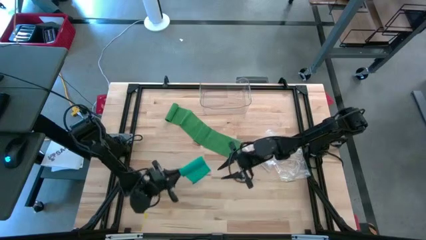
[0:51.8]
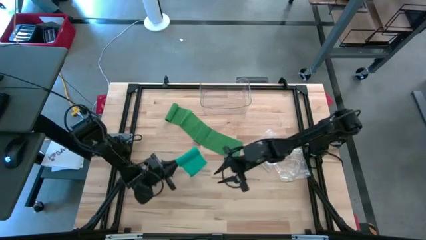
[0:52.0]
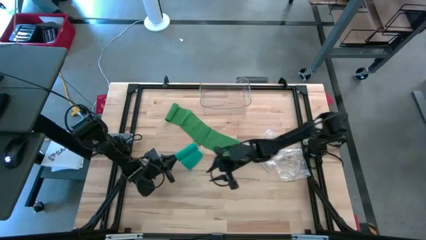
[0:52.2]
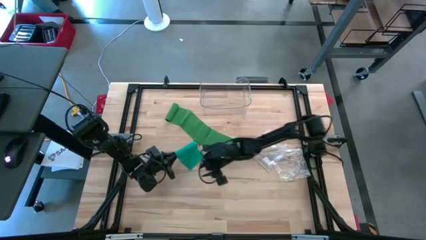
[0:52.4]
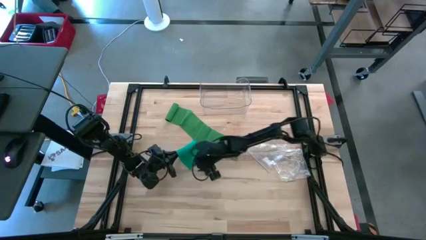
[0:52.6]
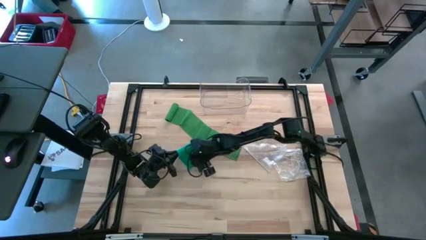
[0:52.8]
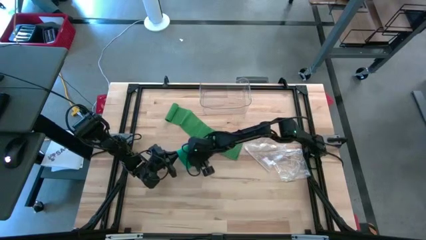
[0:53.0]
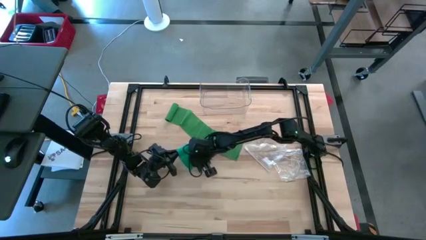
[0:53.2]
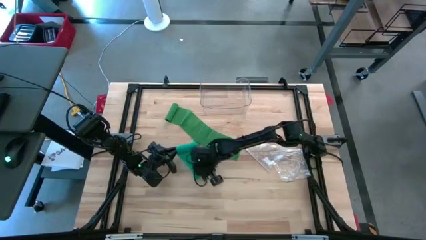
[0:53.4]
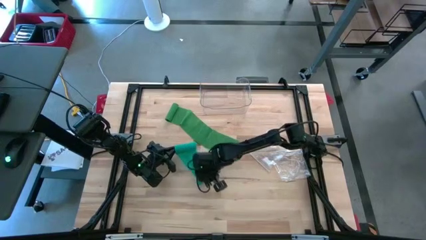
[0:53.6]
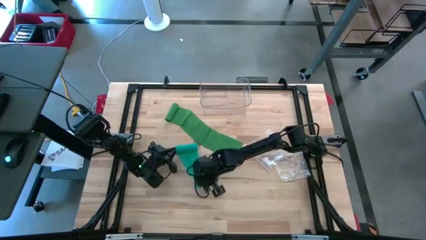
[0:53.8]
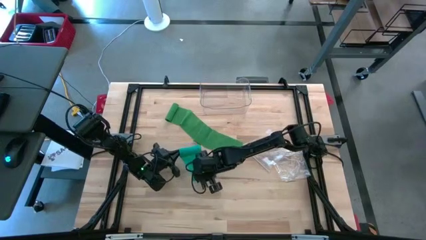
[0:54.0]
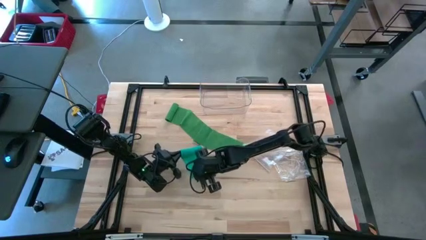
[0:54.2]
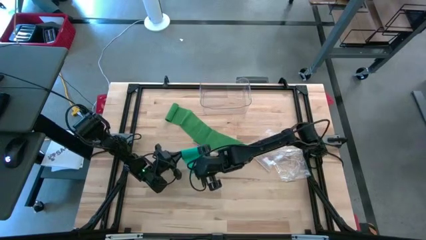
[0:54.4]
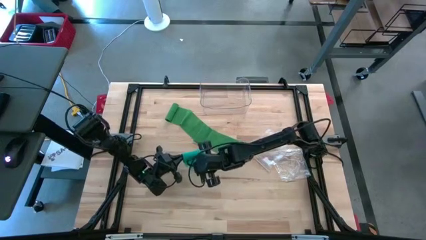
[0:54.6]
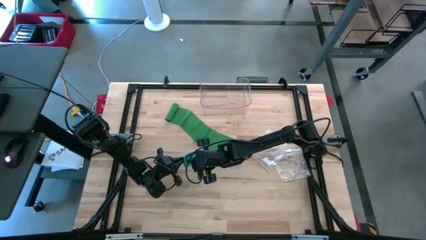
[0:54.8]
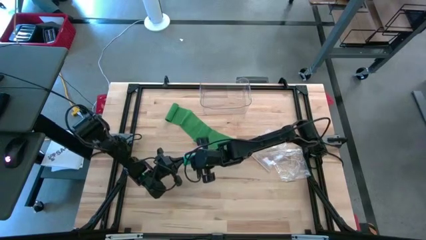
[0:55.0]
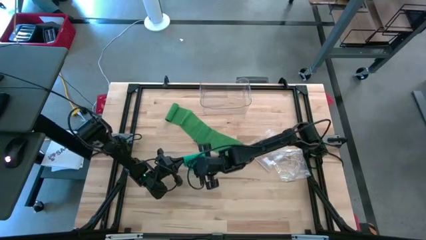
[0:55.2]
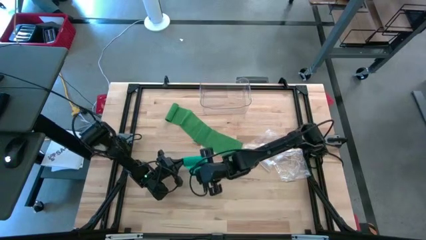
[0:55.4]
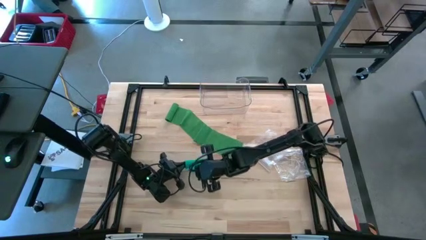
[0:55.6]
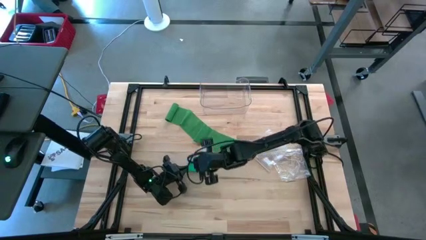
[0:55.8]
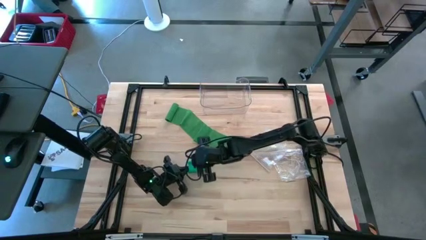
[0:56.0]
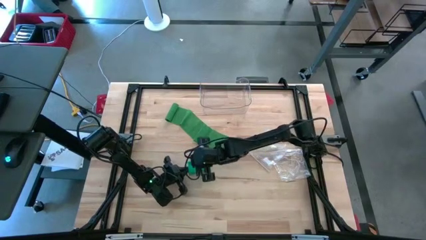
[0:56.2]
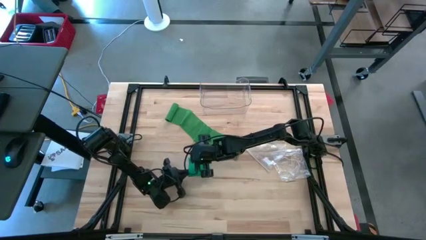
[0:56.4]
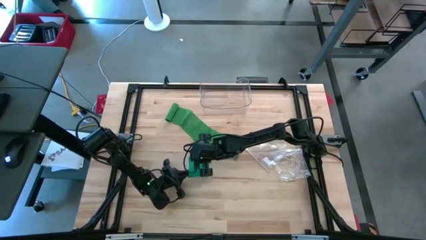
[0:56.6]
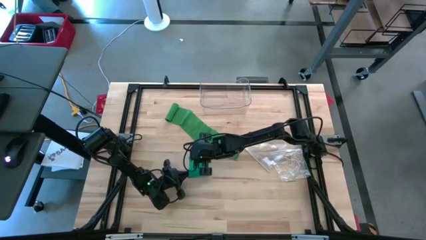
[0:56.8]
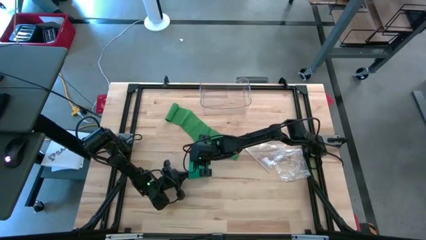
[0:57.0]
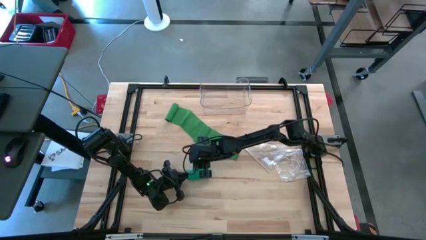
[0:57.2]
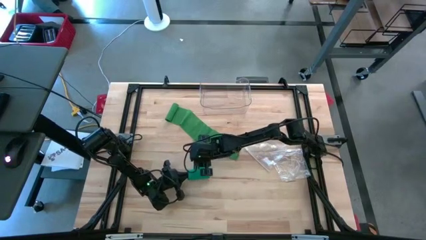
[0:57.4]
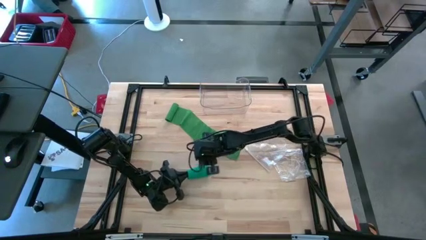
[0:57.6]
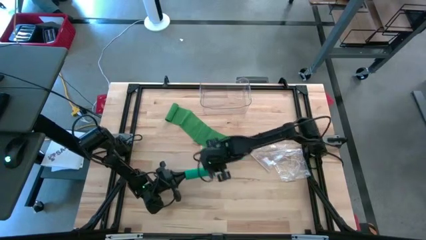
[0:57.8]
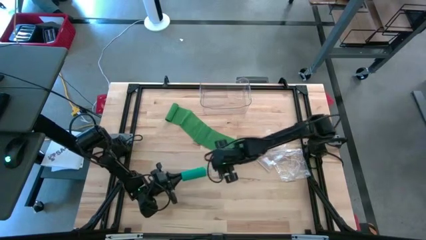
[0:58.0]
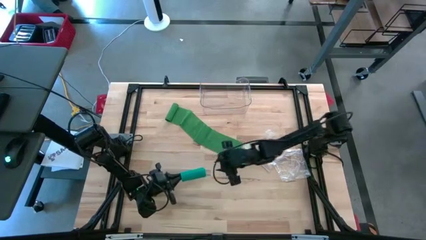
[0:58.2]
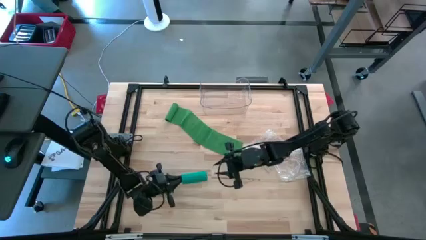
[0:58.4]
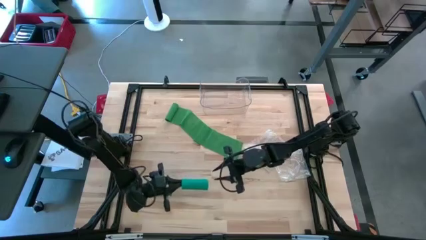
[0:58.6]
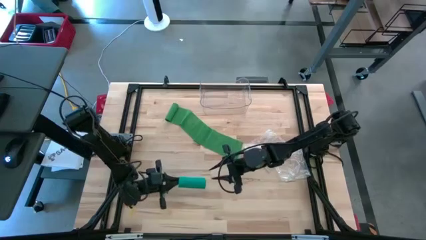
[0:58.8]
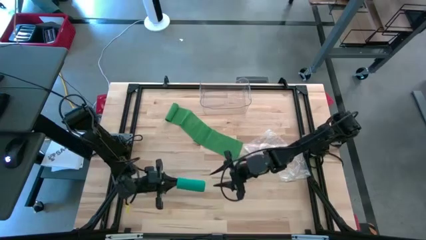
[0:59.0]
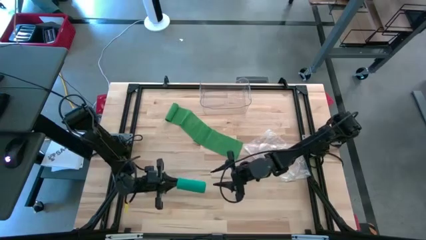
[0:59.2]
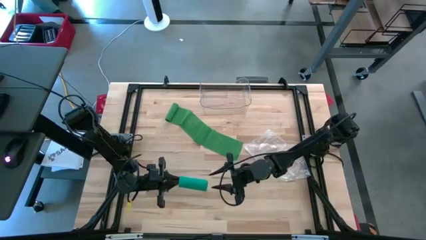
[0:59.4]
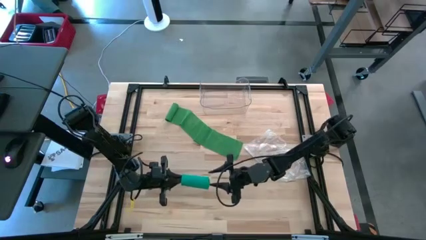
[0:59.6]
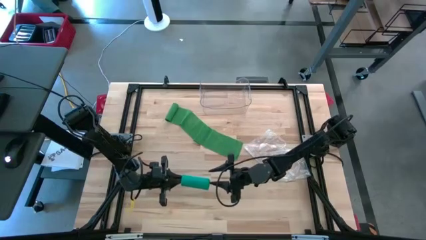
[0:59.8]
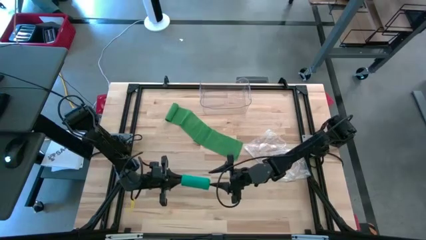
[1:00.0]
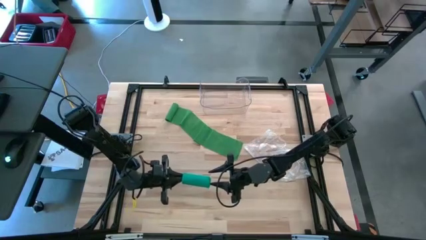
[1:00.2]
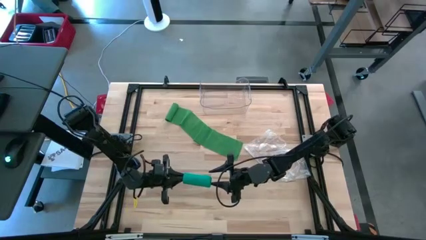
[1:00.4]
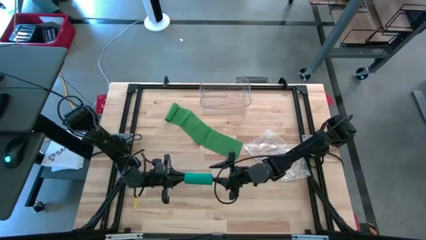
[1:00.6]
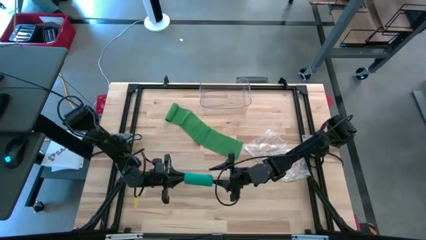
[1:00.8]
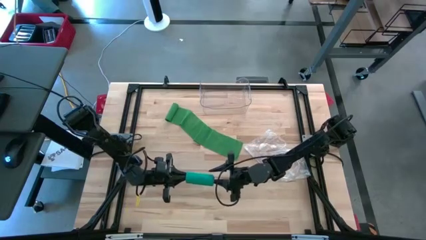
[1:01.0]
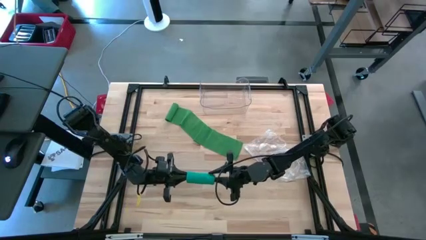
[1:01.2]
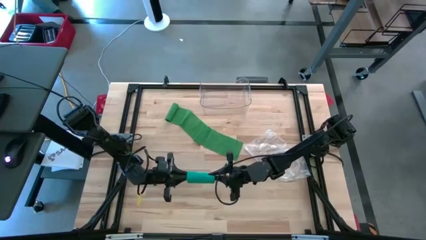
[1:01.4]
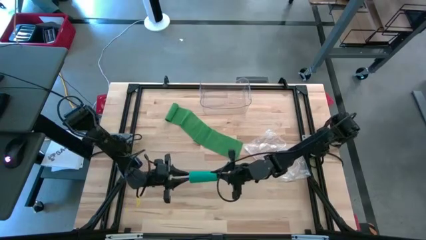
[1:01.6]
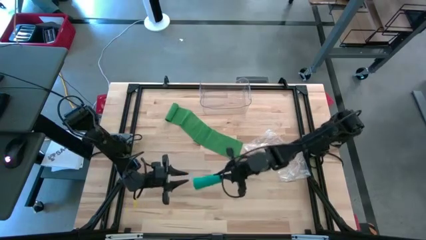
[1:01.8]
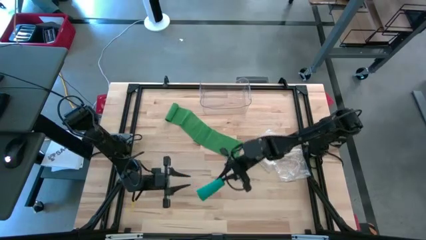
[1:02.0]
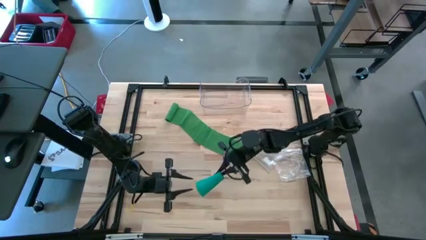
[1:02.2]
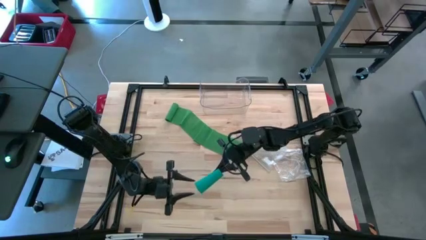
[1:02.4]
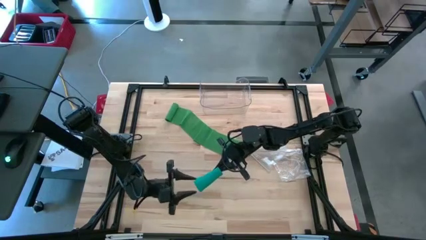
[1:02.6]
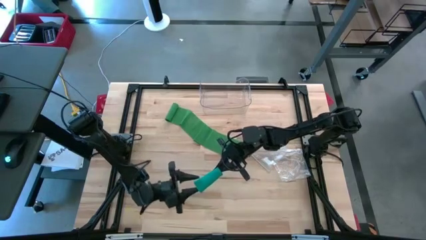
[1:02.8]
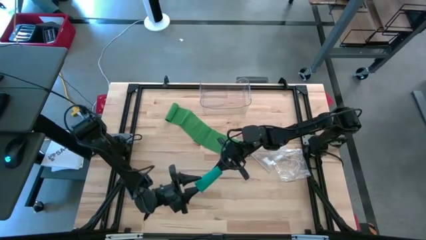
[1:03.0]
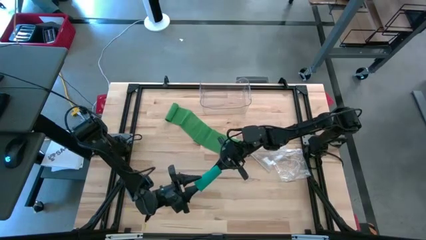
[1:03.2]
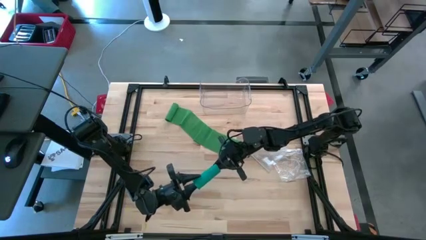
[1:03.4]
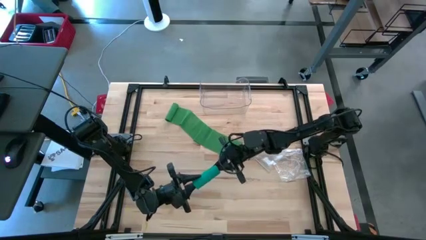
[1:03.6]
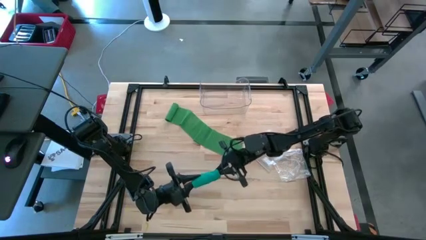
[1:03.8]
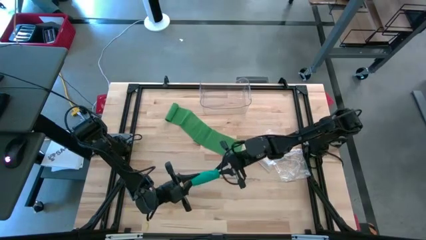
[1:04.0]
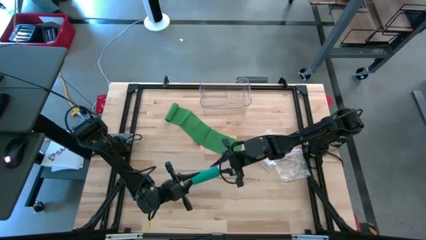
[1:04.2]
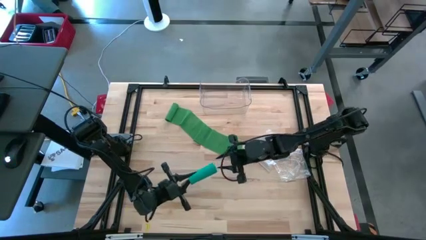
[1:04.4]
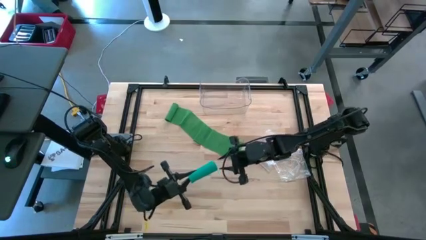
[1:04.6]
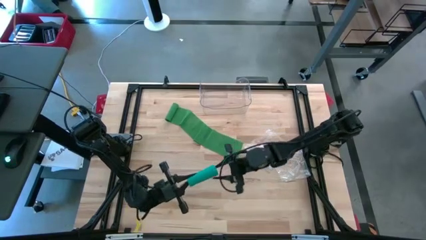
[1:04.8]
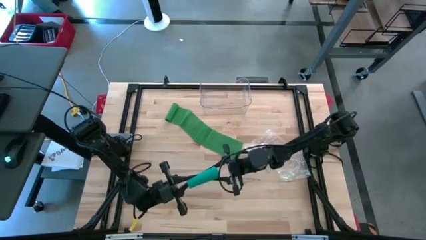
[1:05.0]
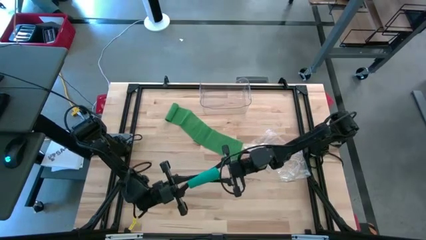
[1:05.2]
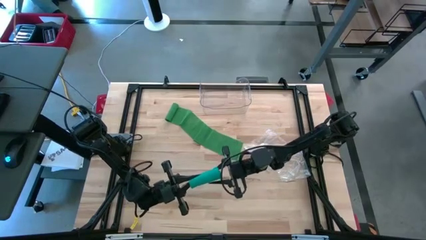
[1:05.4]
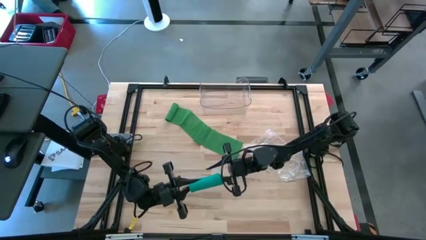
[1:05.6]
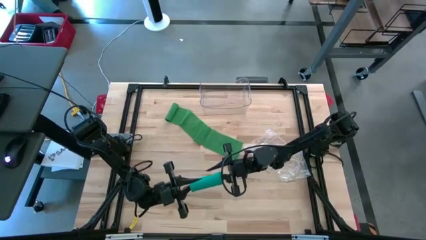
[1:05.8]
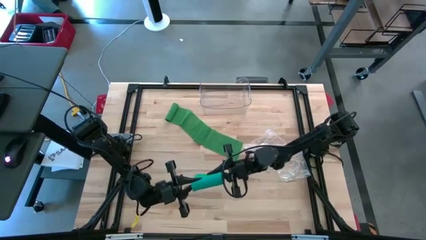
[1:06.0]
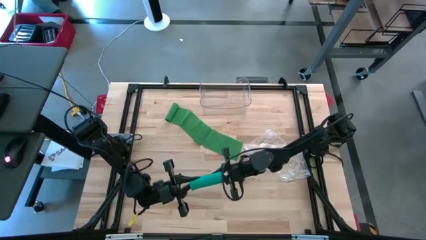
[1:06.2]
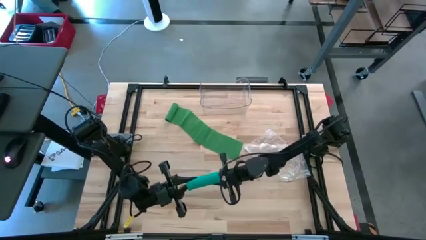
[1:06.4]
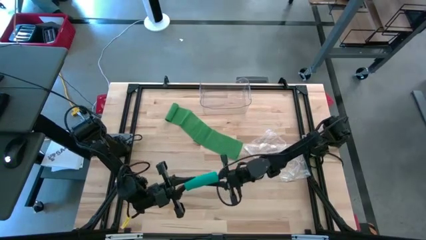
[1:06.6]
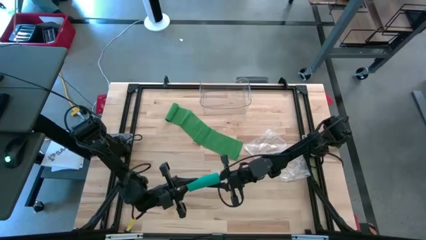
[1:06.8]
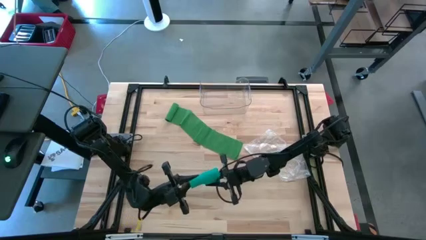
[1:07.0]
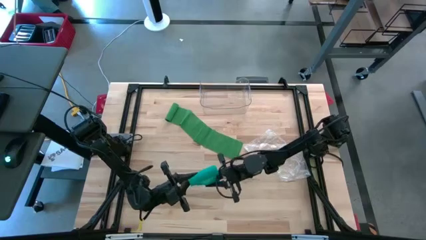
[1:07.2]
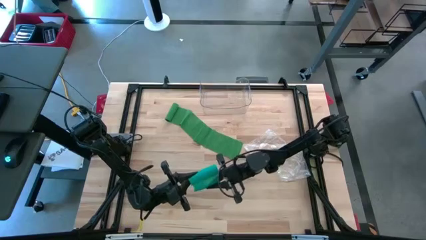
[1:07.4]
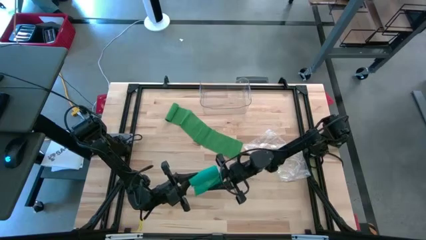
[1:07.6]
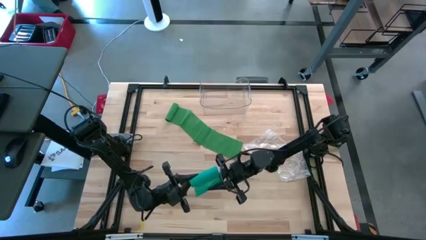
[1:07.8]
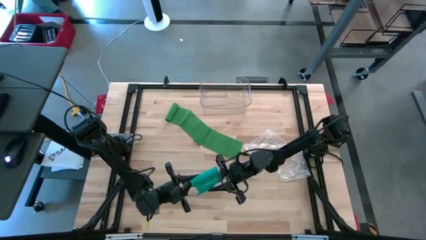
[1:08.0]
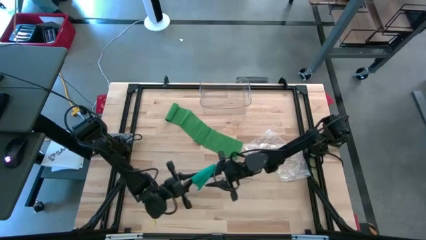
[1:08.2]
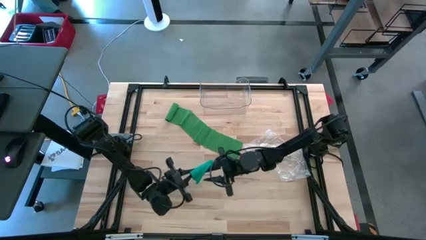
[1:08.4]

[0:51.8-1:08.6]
Task: Roll bandage
Roll the blue bandage
